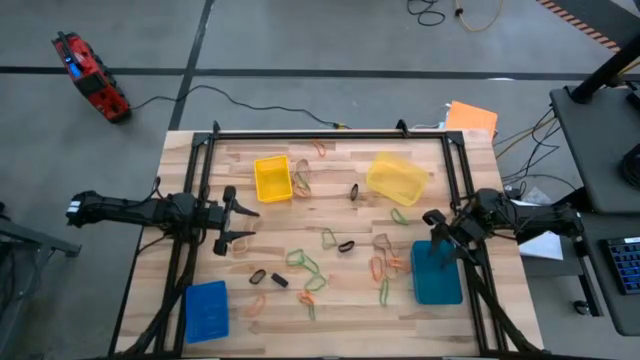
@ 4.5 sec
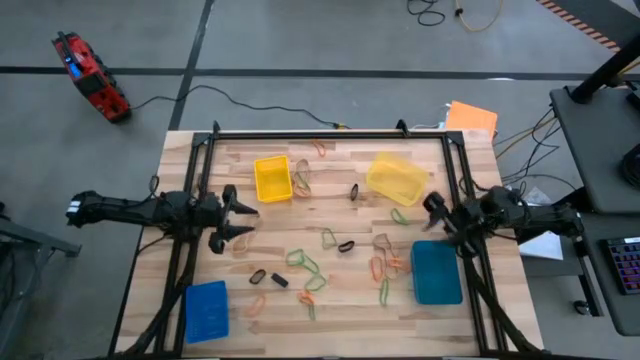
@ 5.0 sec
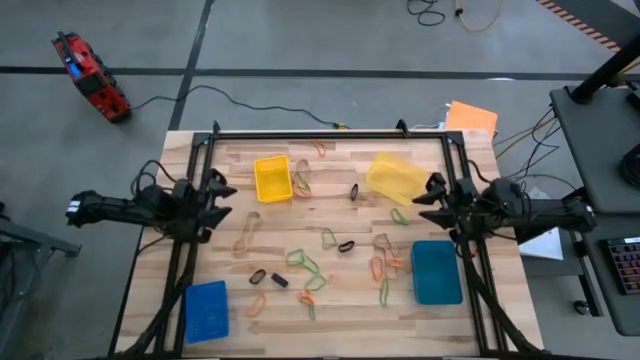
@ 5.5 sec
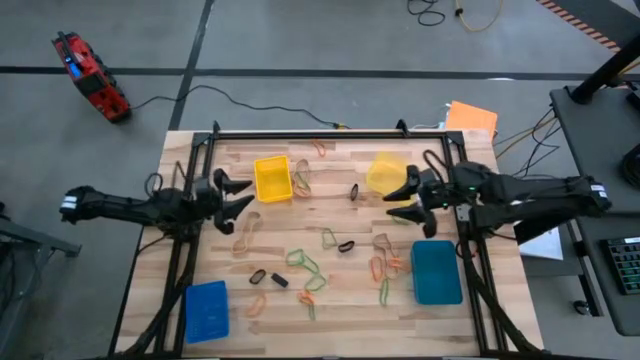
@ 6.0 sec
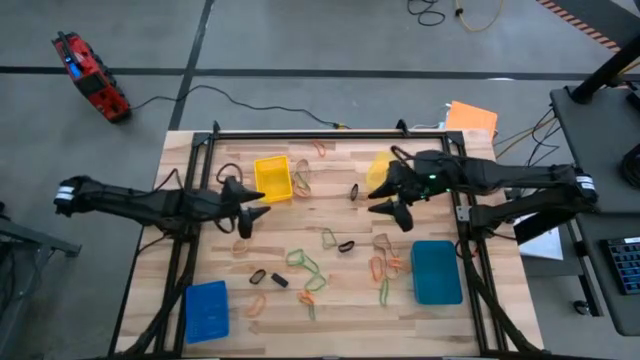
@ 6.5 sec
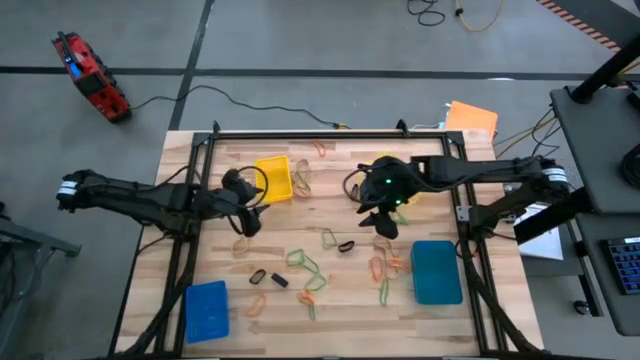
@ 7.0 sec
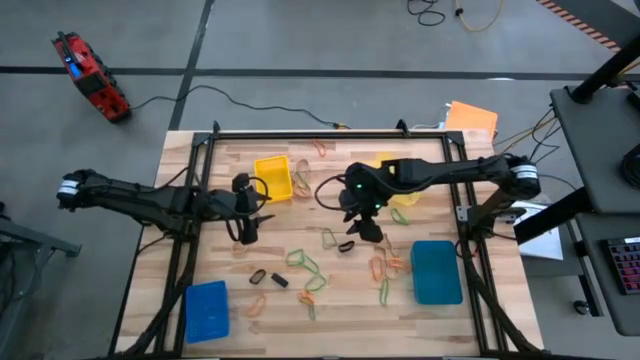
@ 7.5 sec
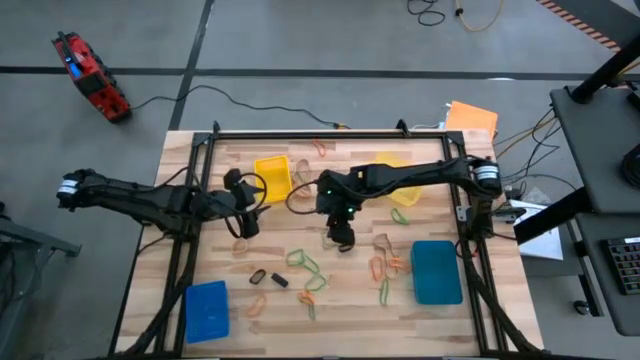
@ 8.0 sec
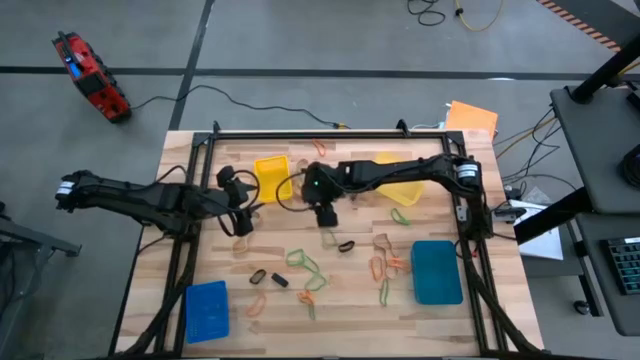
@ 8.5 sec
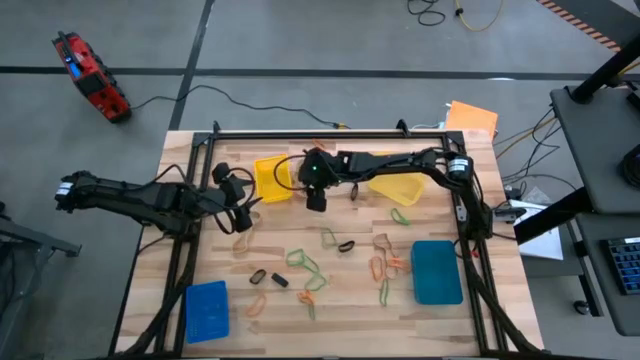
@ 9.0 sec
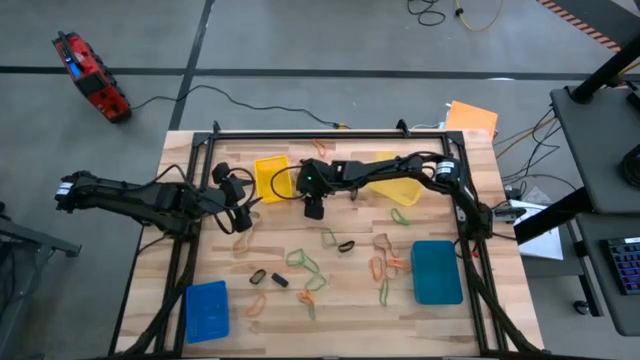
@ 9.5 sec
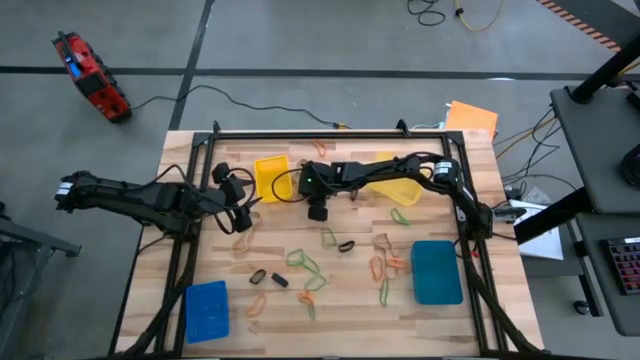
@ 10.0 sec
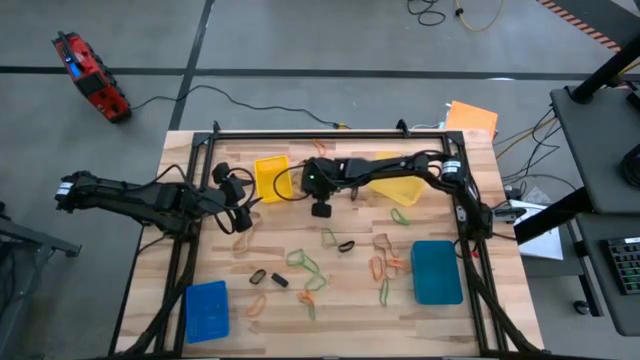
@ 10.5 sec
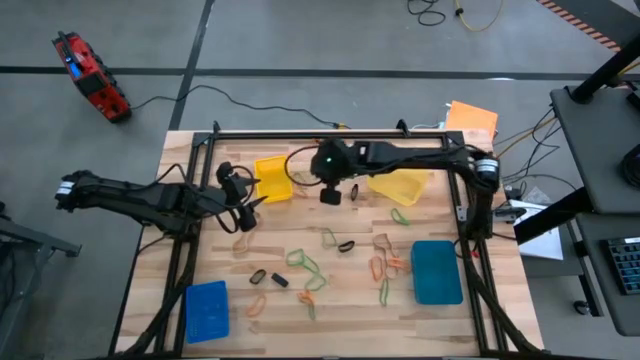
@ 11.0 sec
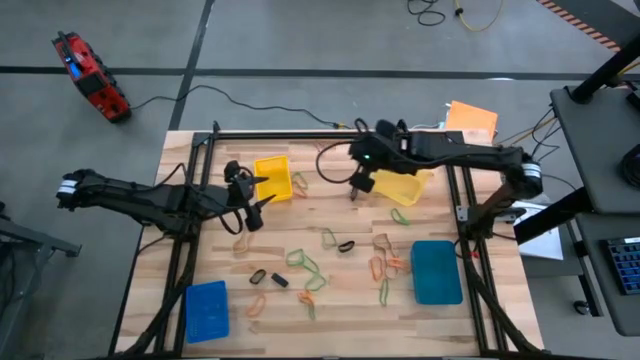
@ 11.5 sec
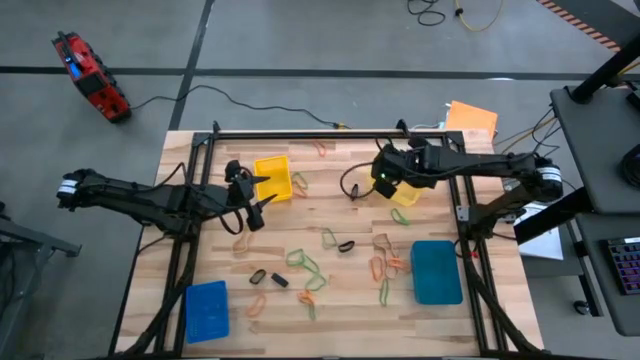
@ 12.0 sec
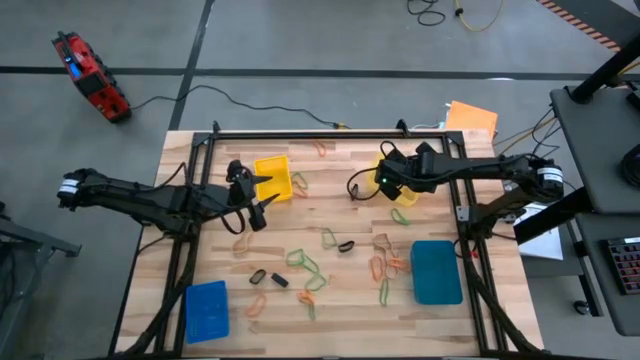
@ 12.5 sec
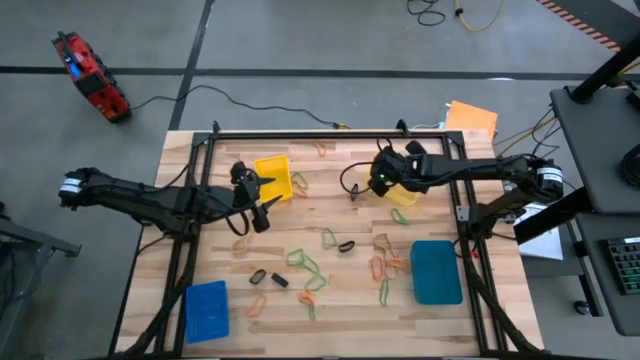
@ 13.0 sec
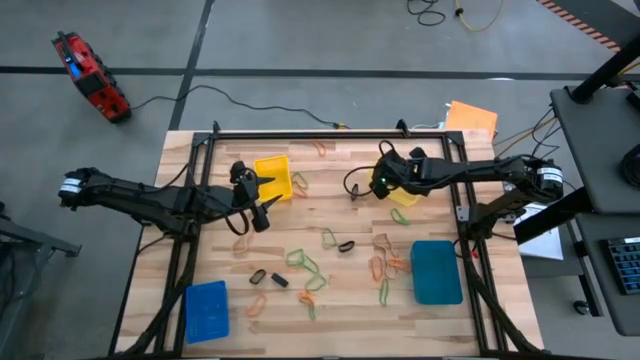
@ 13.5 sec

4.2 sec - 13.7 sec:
Task: Sort rubber bands into baskets
Put the brown rubber band into the right yellow bin

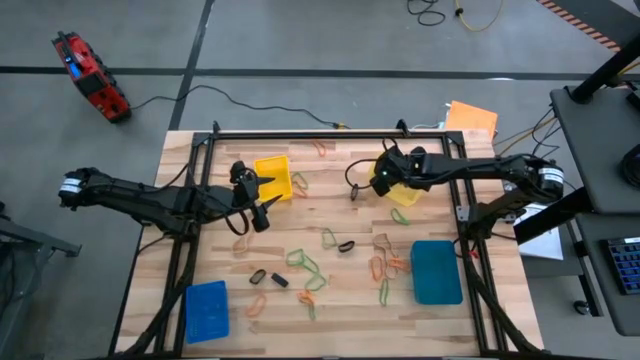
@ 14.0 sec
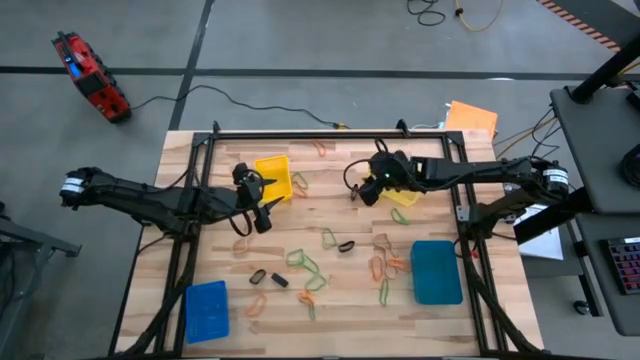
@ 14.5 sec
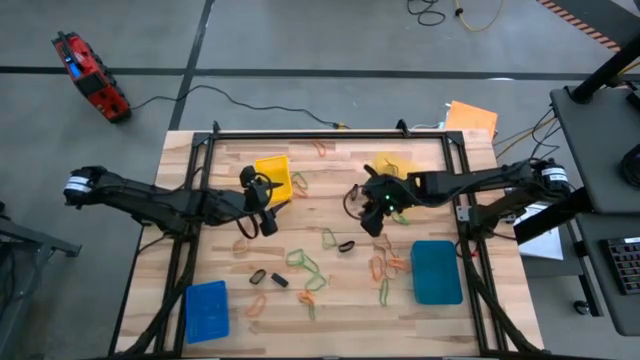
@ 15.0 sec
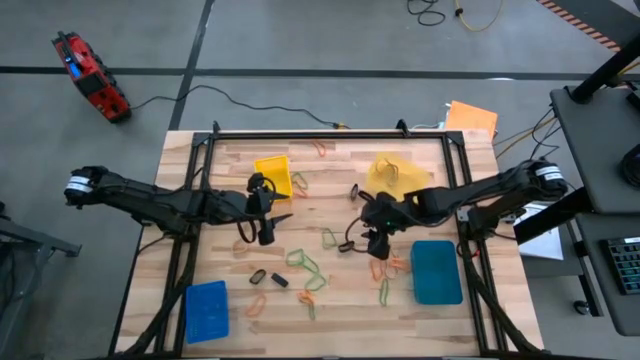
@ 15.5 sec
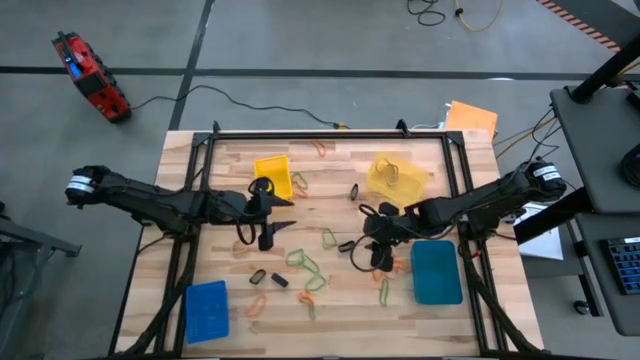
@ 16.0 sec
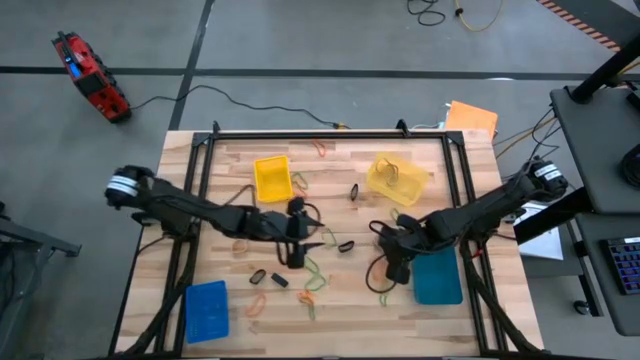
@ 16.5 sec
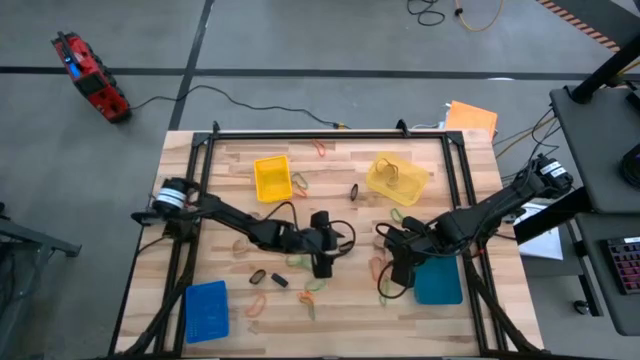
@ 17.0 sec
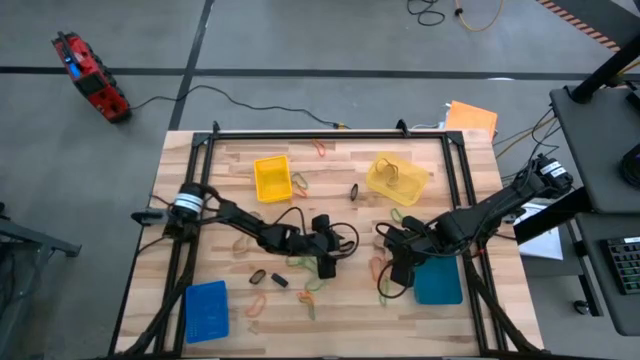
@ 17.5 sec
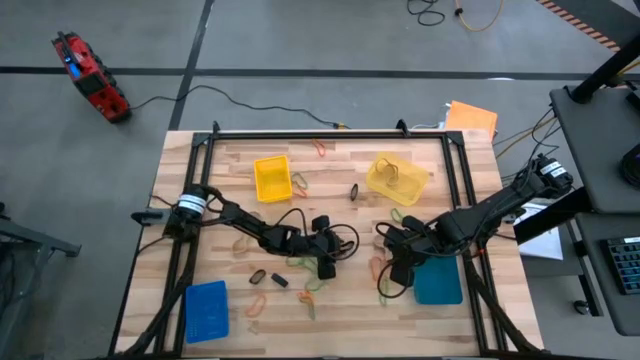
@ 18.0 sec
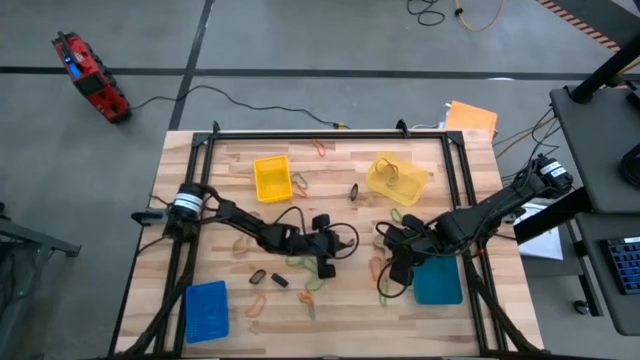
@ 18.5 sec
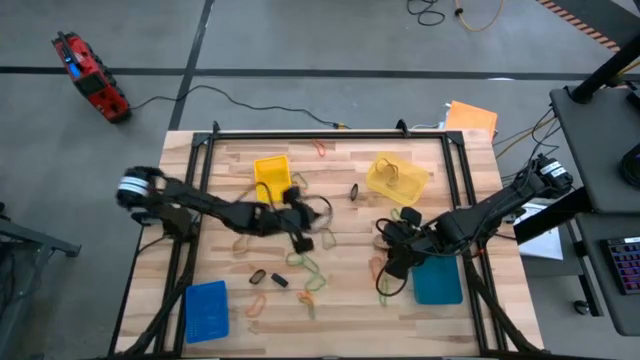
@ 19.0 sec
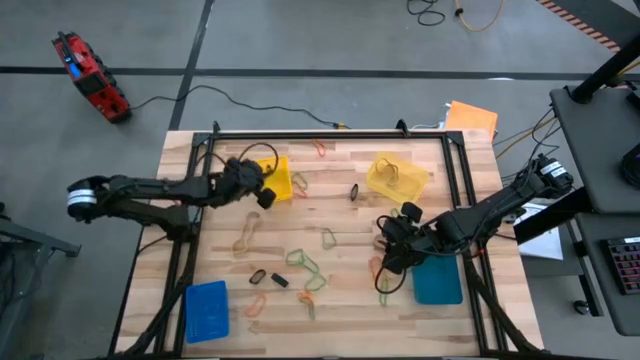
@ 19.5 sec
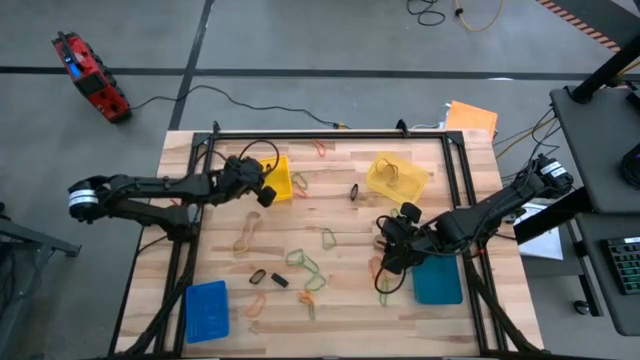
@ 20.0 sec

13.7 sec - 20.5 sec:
Put the black rubber band into the left yellow bin

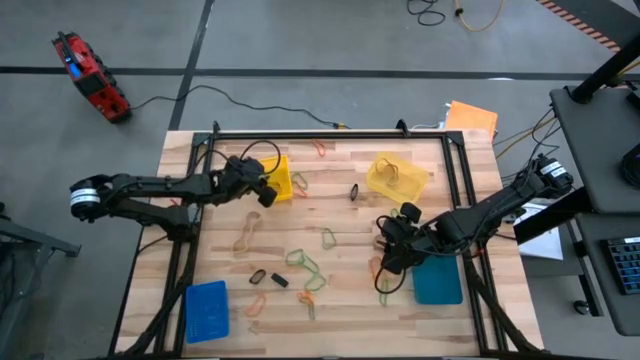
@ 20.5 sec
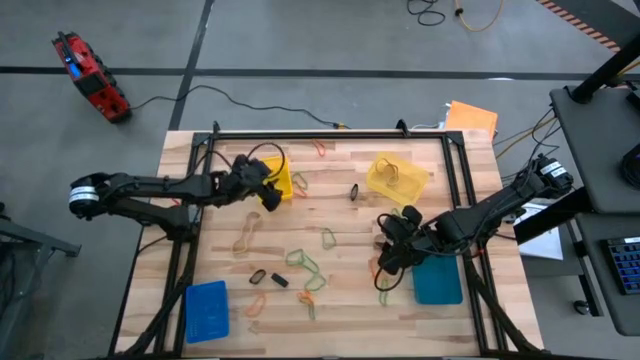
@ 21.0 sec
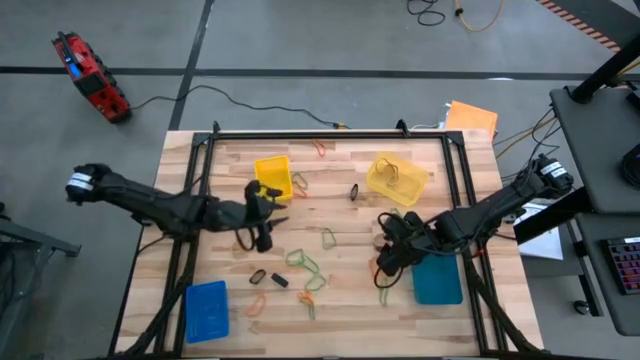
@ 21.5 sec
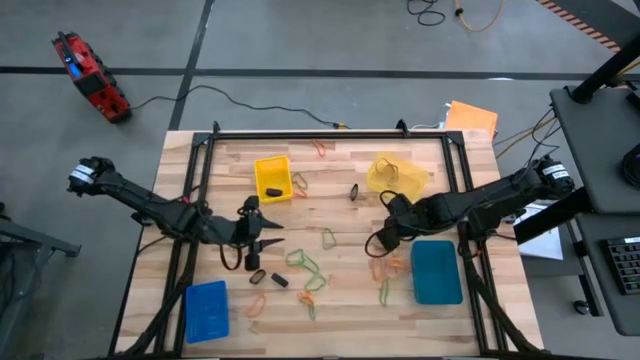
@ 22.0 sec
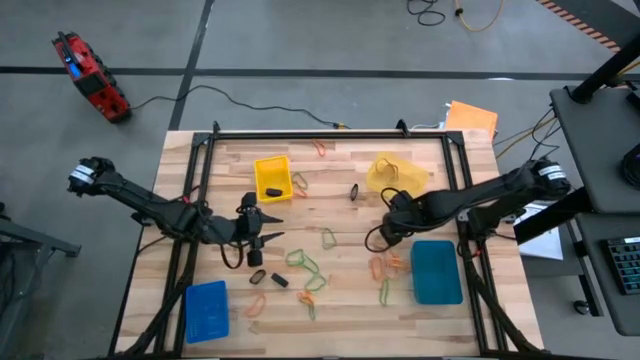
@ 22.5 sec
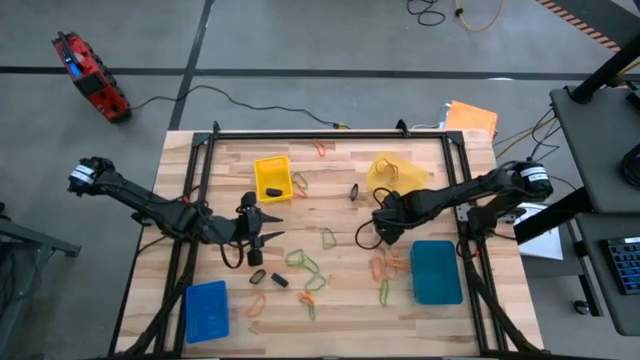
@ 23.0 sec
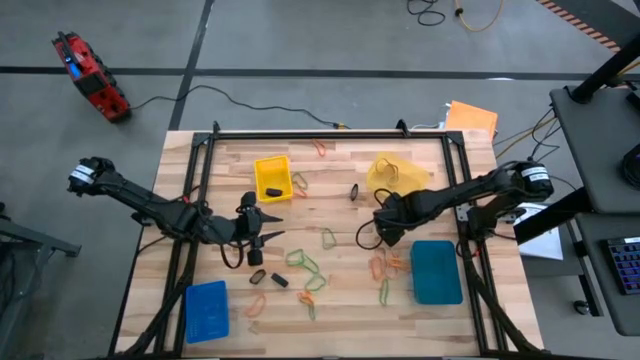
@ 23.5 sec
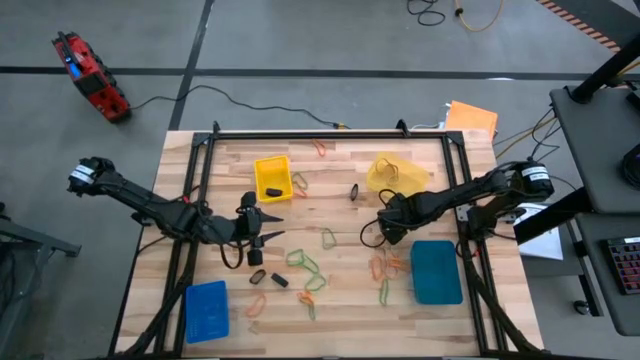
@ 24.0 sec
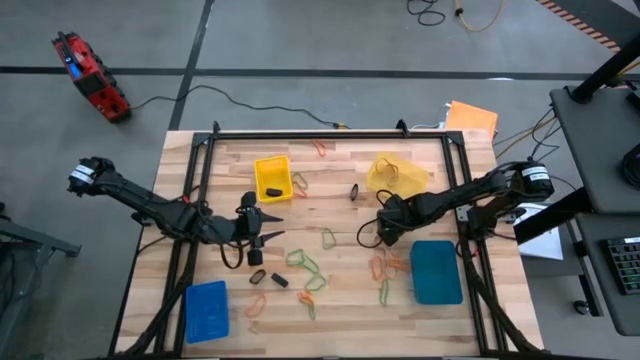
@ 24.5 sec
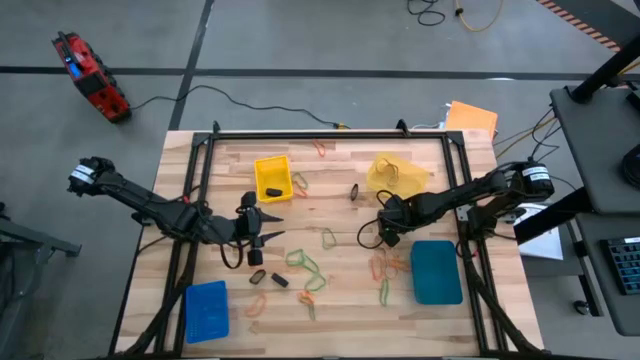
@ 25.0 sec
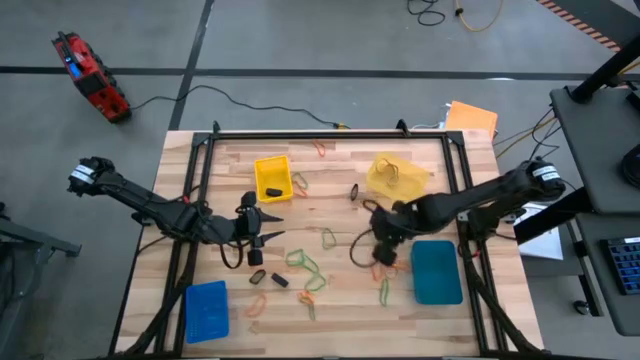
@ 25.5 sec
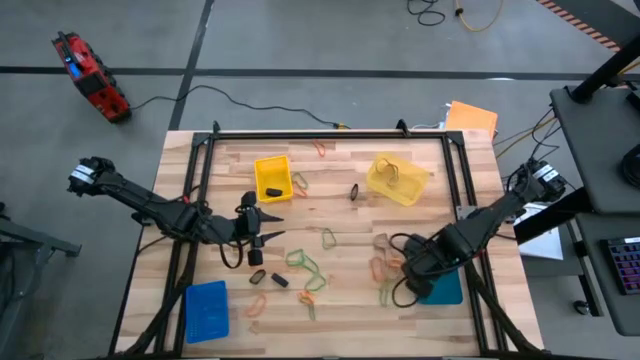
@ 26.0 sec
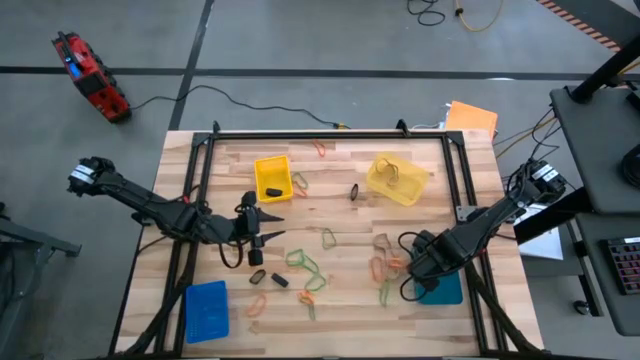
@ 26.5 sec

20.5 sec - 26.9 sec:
Put the green rubber band into the left blue bin
